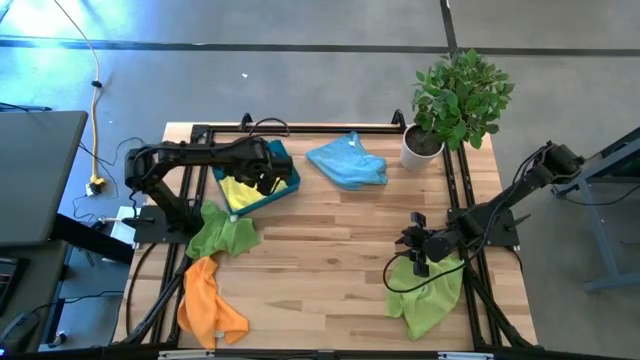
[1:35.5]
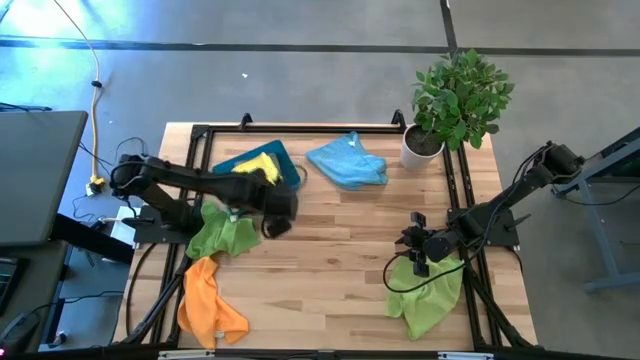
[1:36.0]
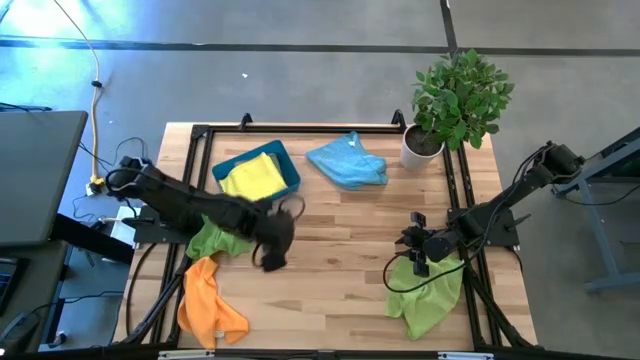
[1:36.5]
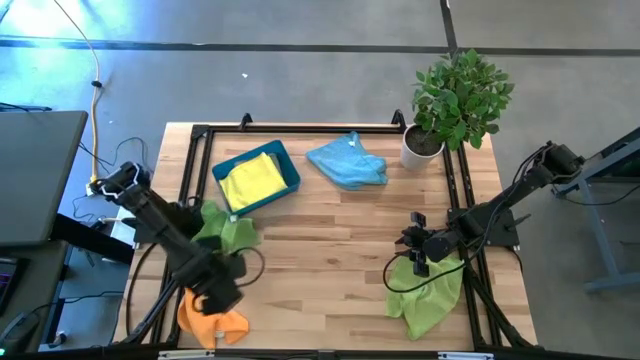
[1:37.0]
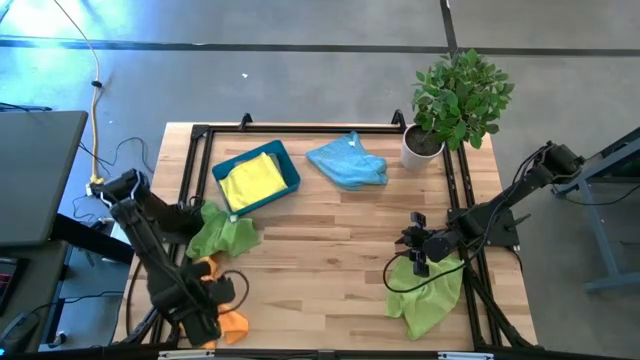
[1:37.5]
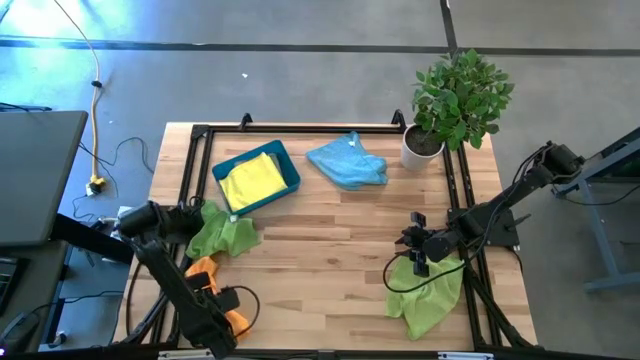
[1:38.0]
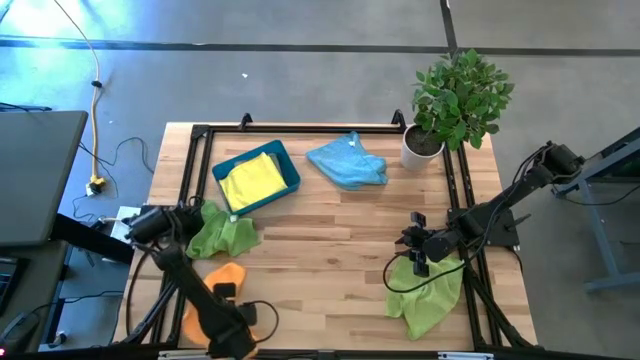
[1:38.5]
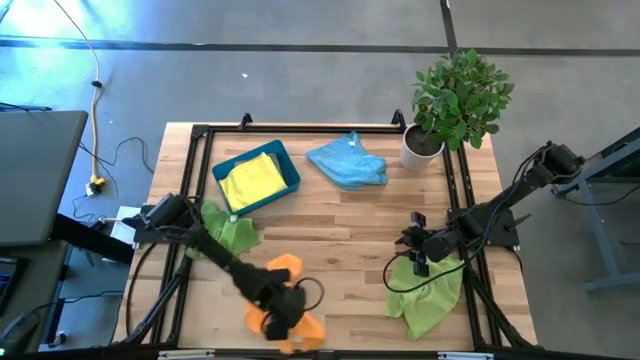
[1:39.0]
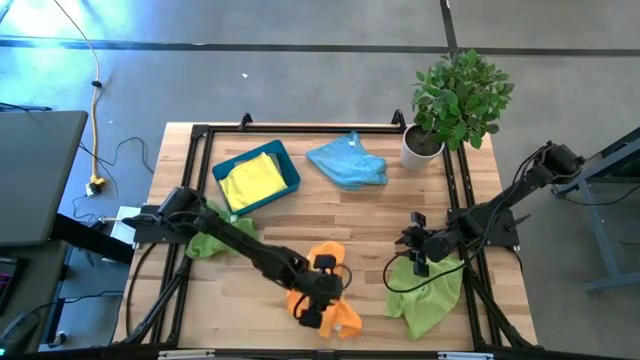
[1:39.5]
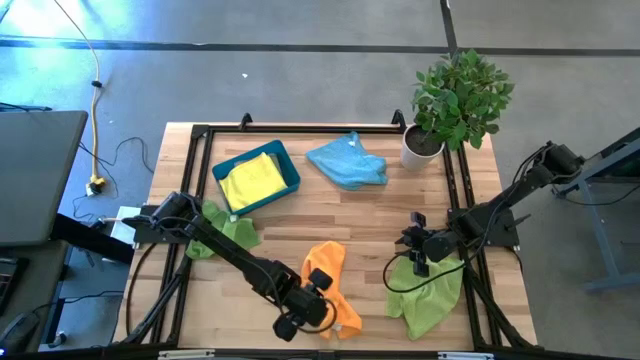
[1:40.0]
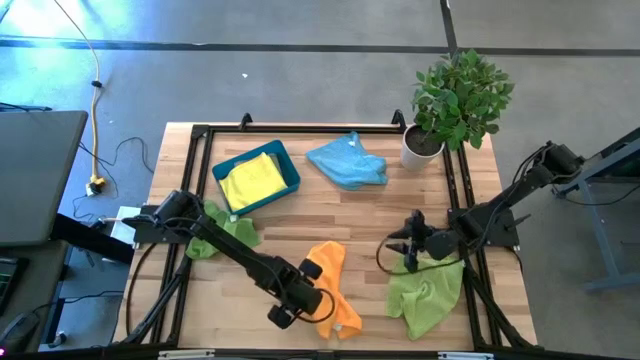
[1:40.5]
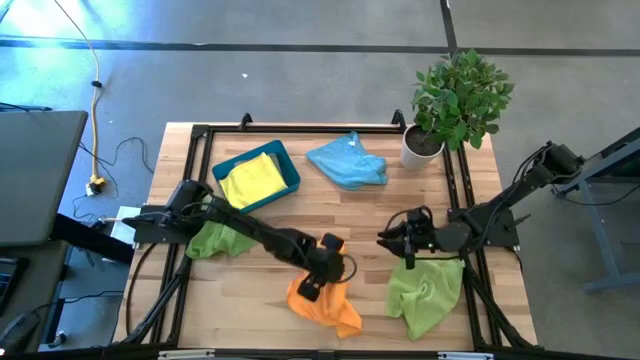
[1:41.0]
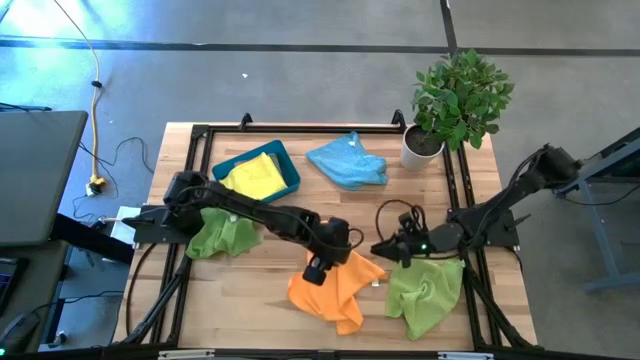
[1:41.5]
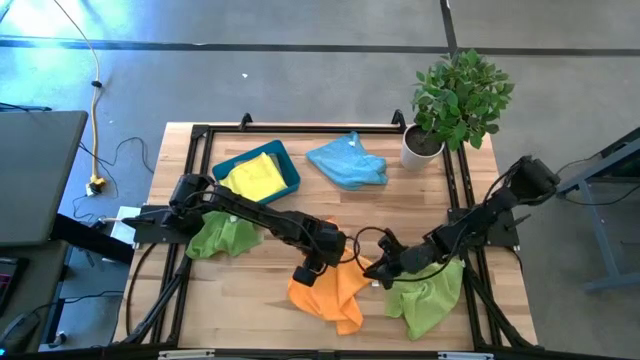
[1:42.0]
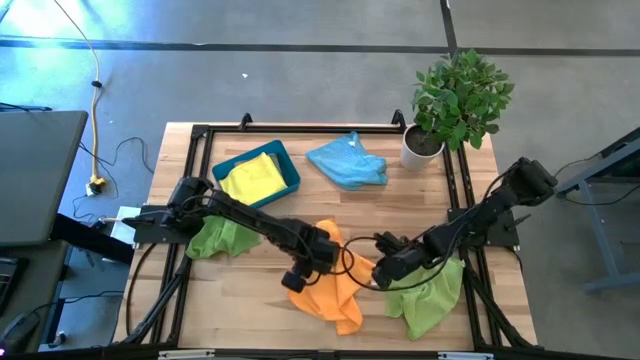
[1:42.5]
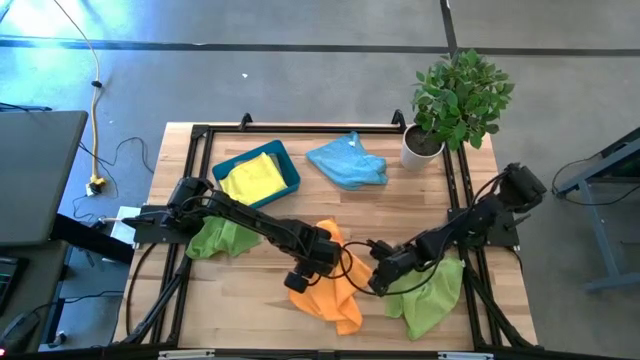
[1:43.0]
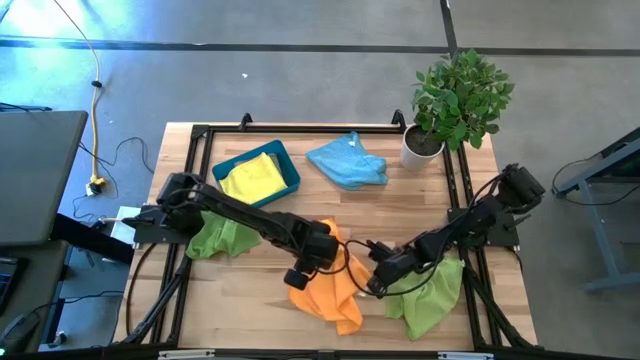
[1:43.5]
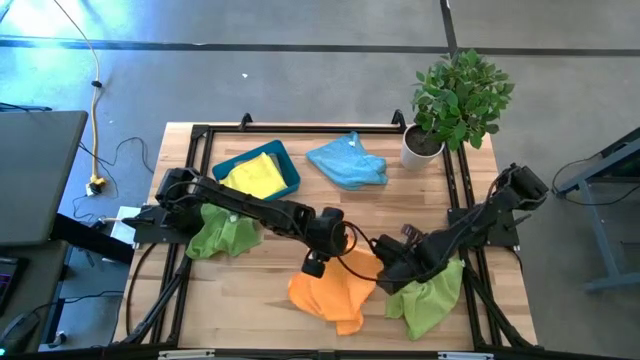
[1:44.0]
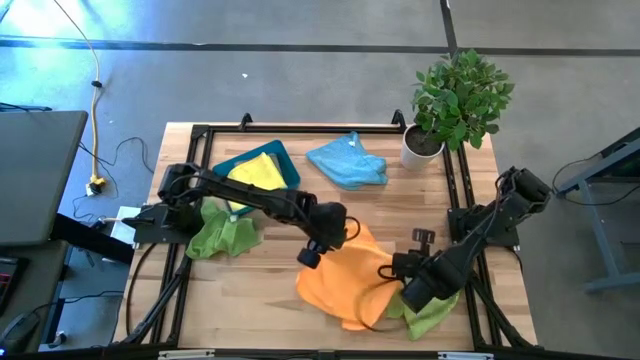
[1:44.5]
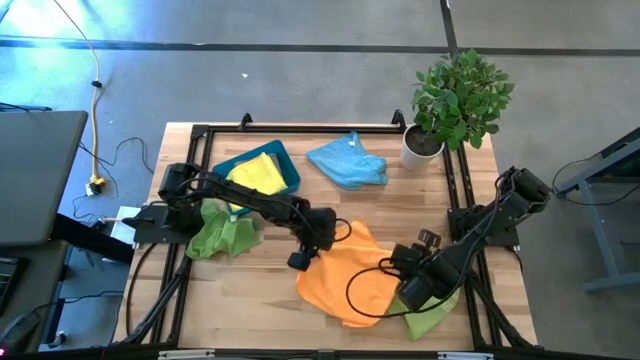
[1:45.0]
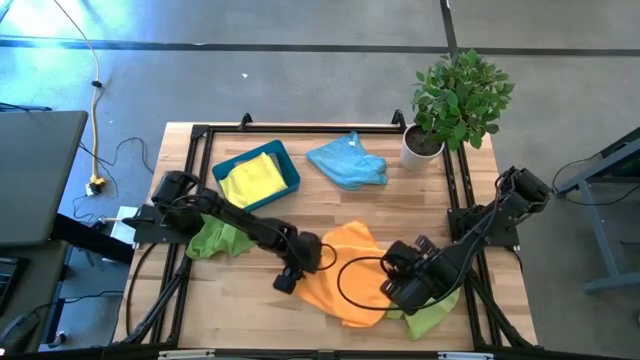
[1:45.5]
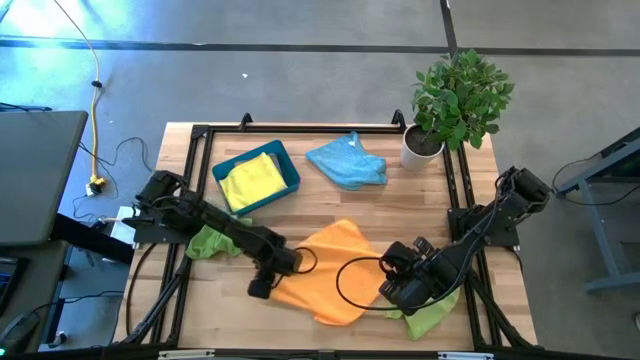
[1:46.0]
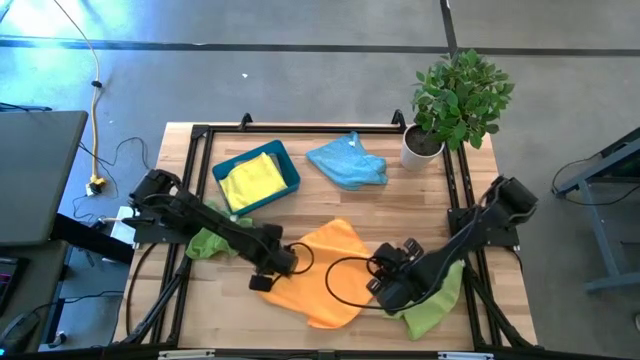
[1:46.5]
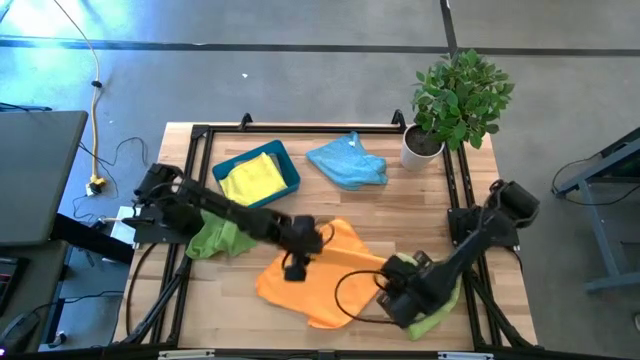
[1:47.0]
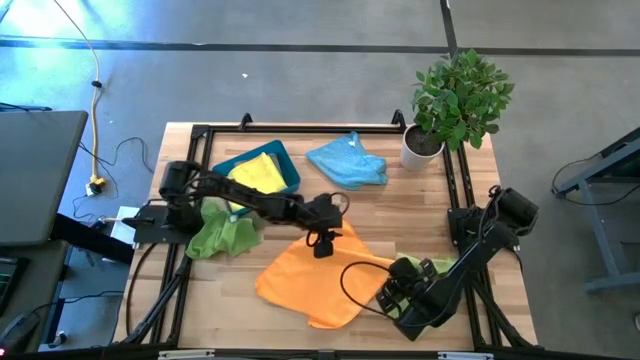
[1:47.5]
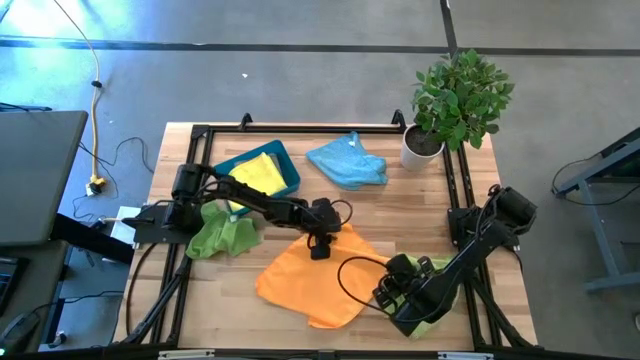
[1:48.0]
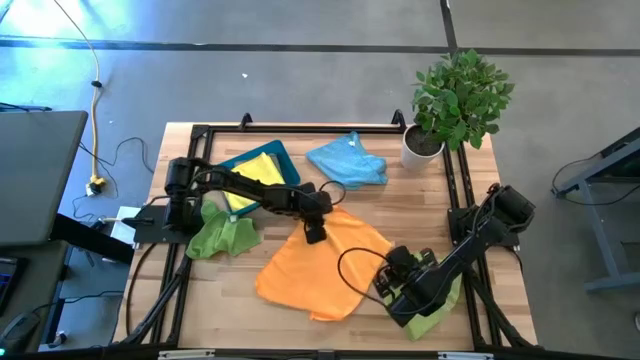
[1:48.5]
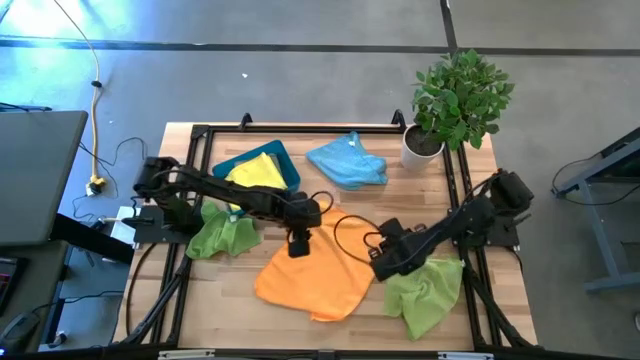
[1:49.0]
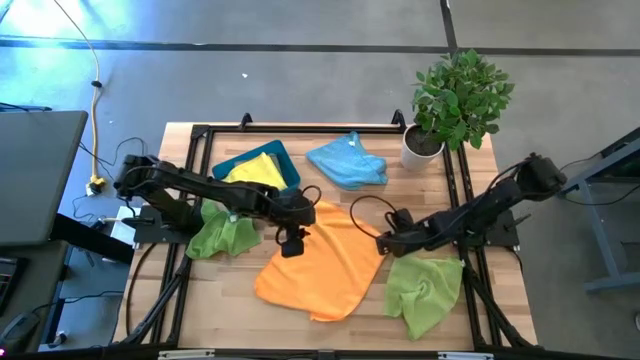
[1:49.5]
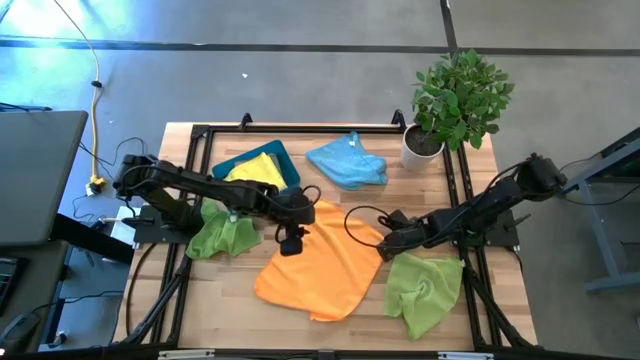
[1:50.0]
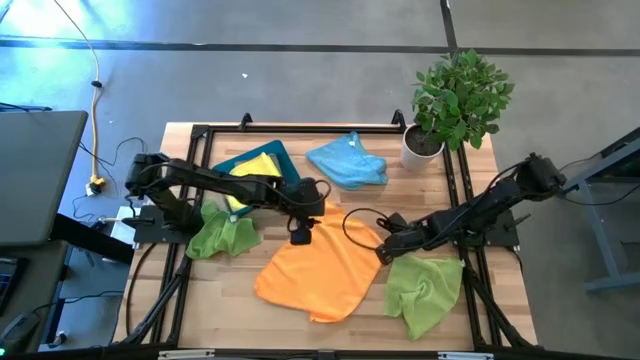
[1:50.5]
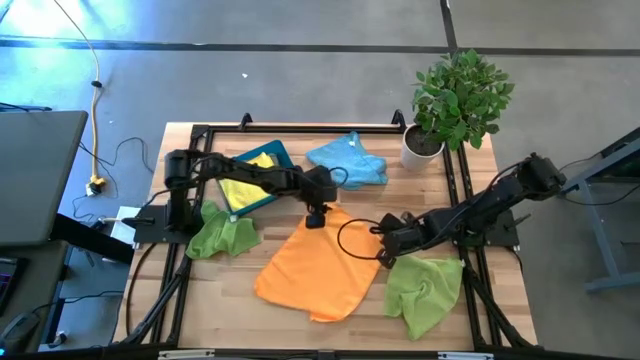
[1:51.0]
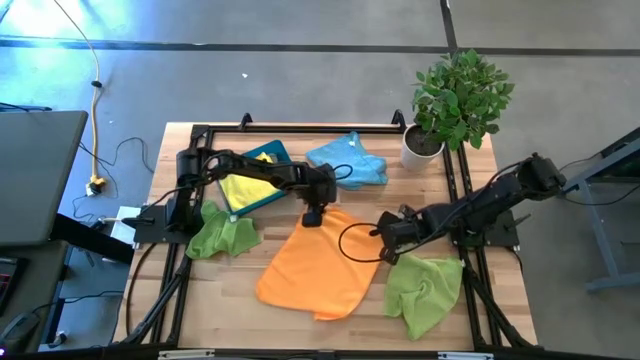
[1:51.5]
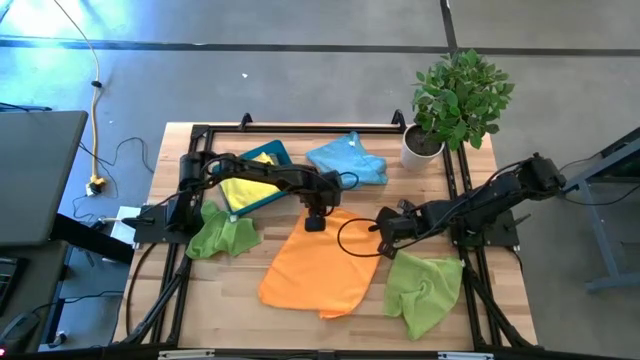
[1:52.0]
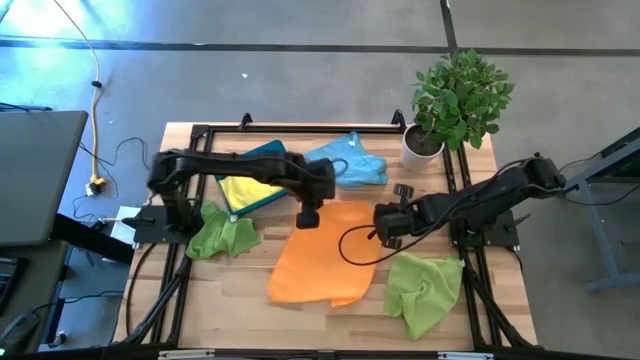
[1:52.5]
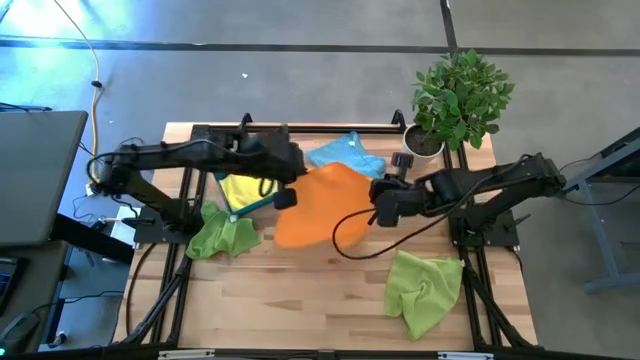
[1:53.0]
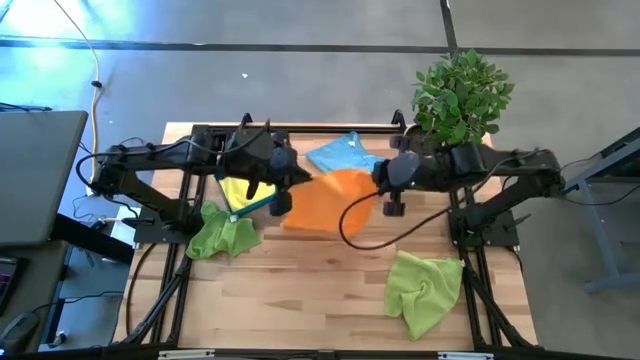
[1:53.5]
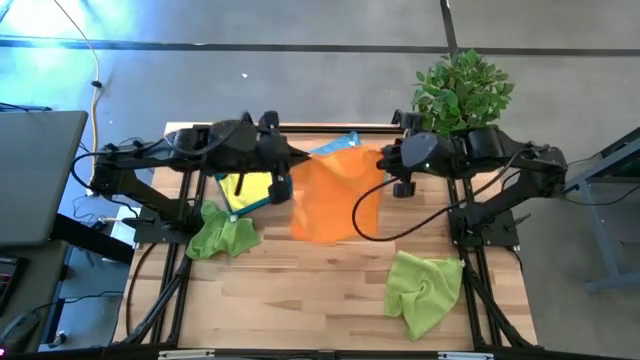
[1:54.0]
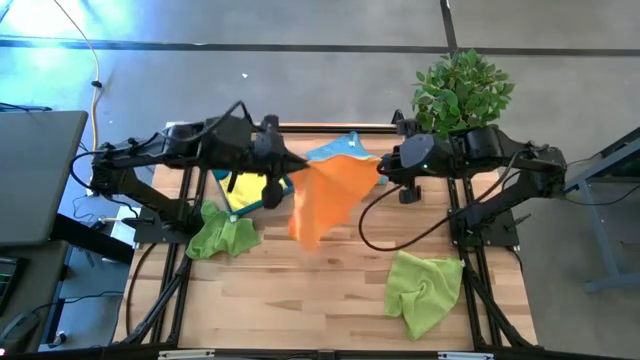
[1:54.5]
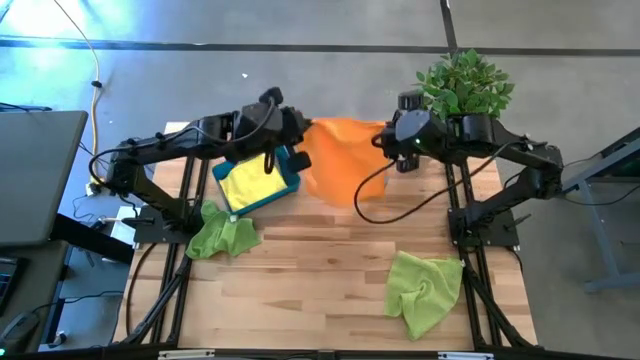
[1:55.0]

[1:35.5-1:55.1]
Task: Fold microfiber towels
Fold the orange microfiber cloth
